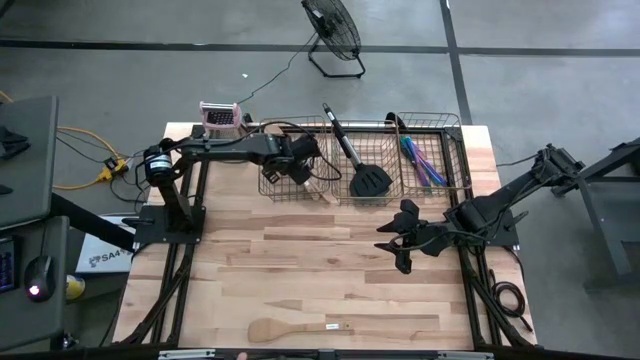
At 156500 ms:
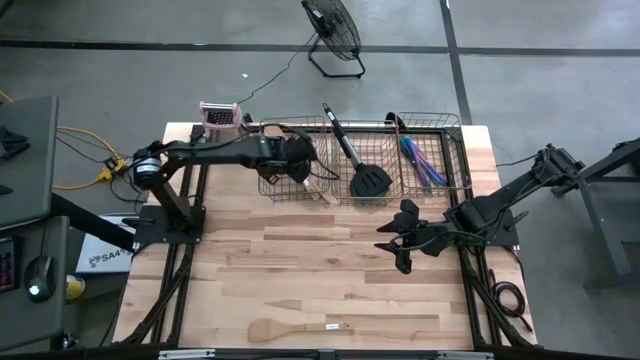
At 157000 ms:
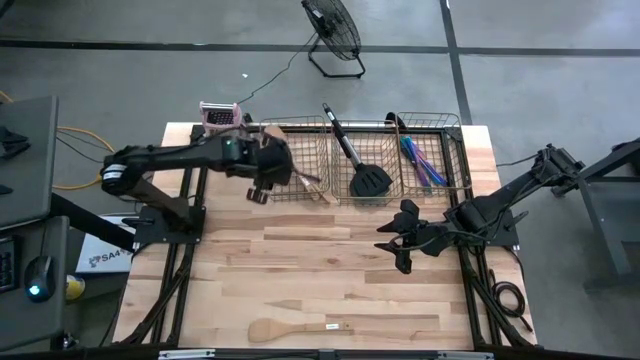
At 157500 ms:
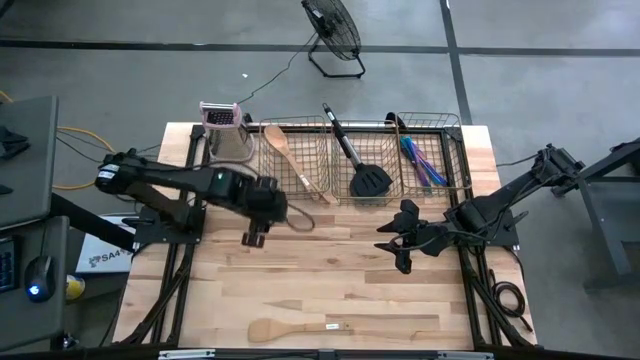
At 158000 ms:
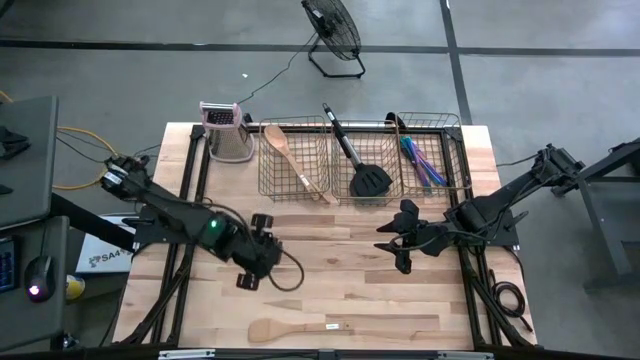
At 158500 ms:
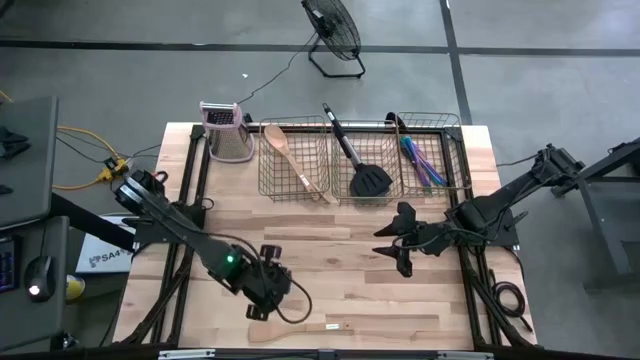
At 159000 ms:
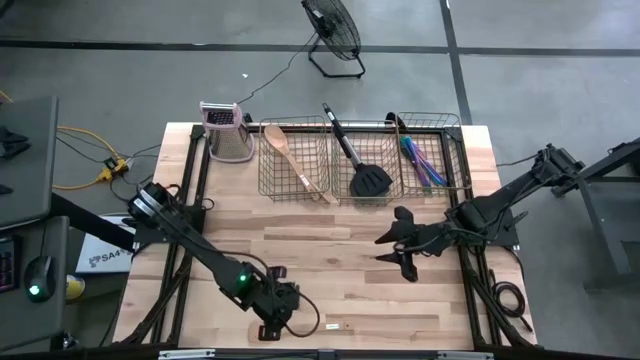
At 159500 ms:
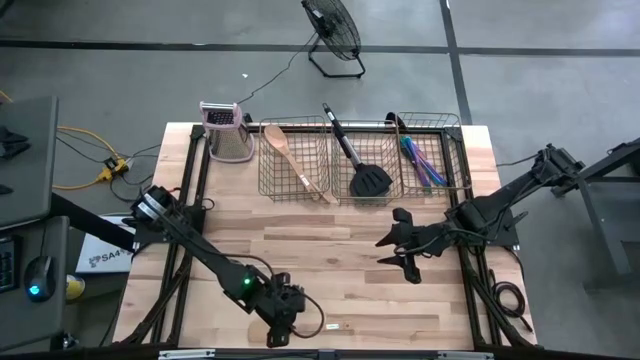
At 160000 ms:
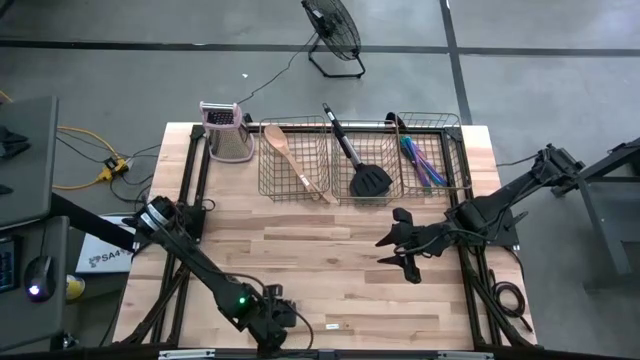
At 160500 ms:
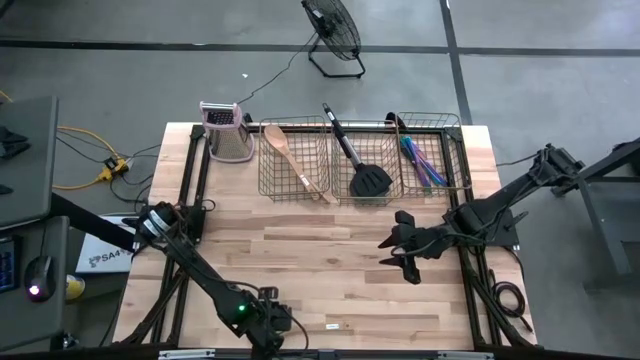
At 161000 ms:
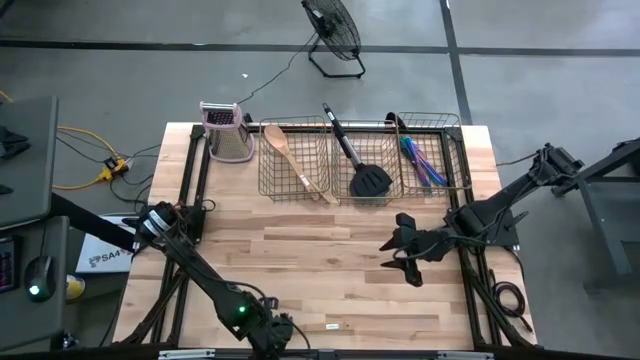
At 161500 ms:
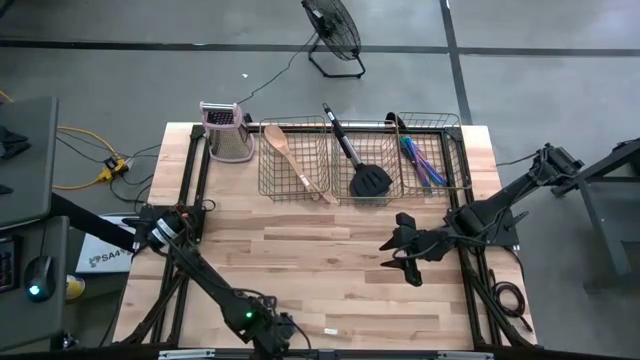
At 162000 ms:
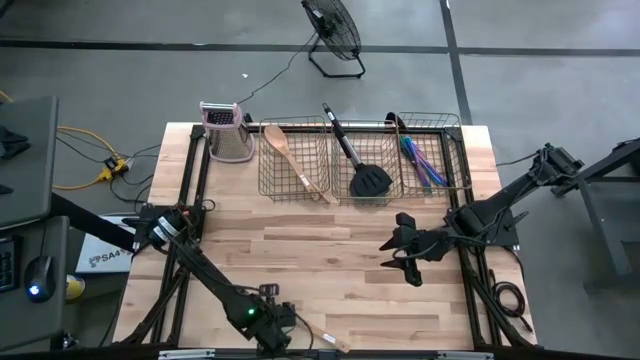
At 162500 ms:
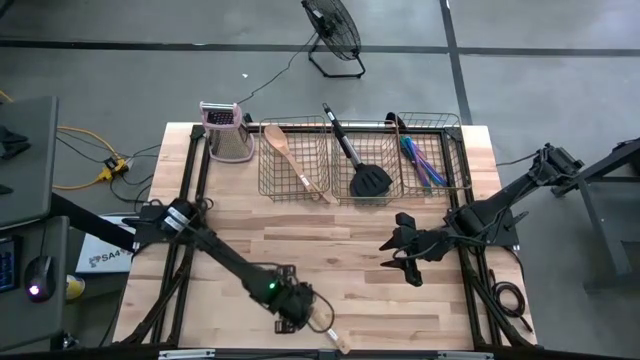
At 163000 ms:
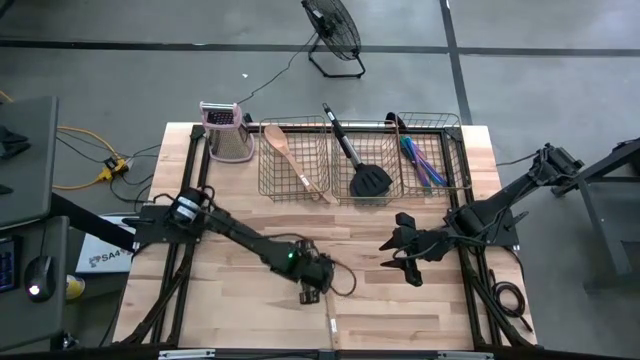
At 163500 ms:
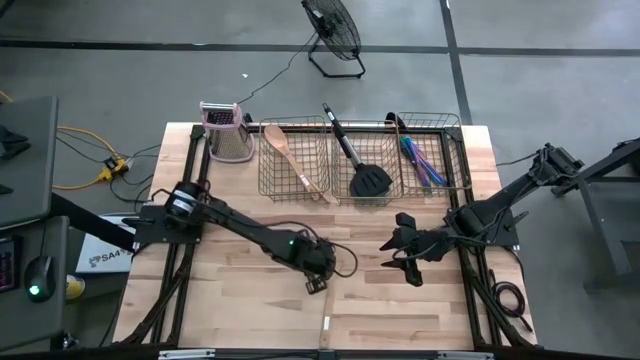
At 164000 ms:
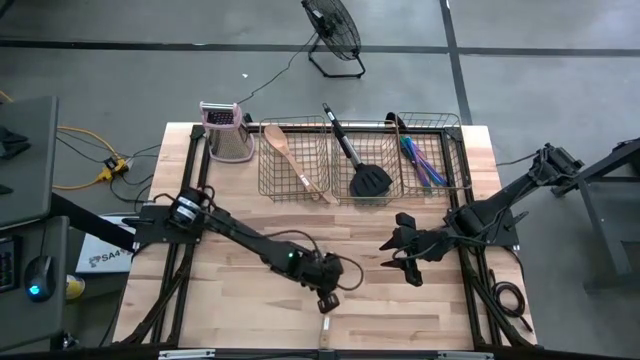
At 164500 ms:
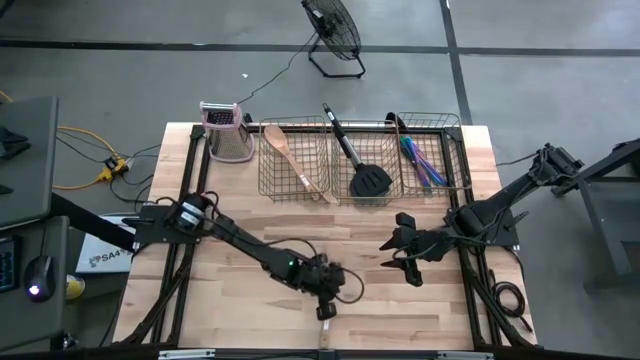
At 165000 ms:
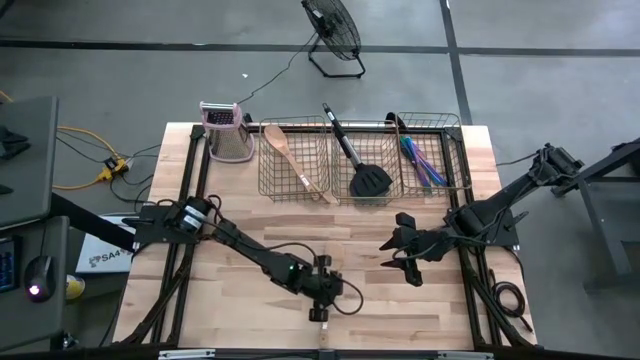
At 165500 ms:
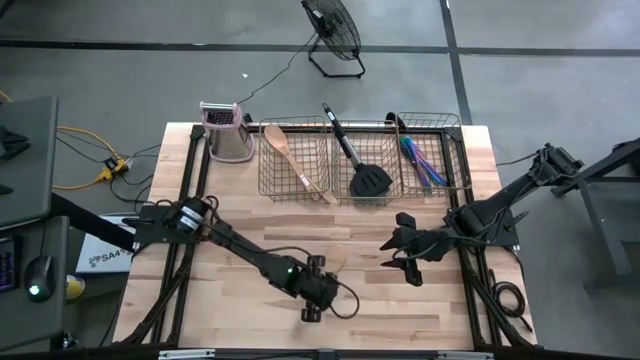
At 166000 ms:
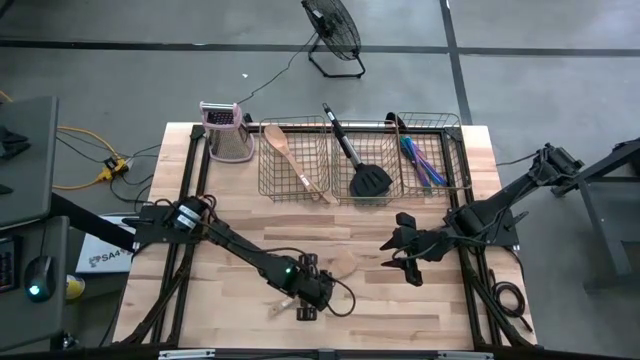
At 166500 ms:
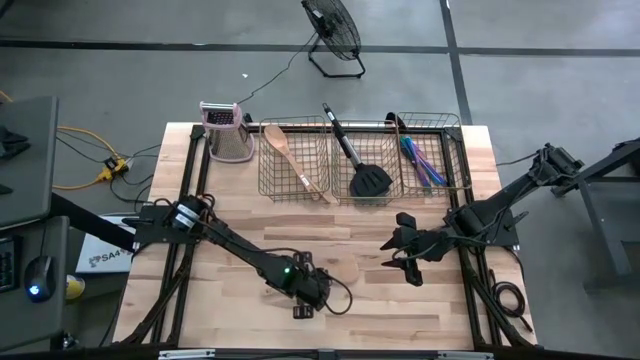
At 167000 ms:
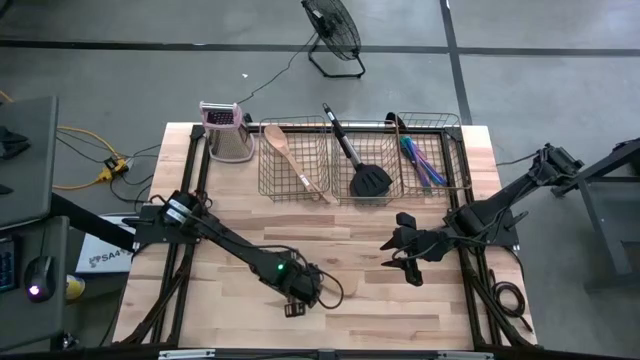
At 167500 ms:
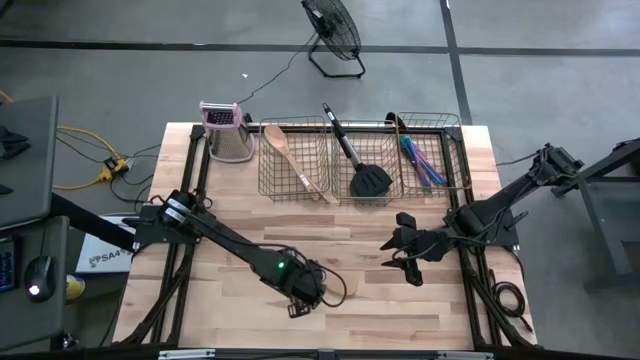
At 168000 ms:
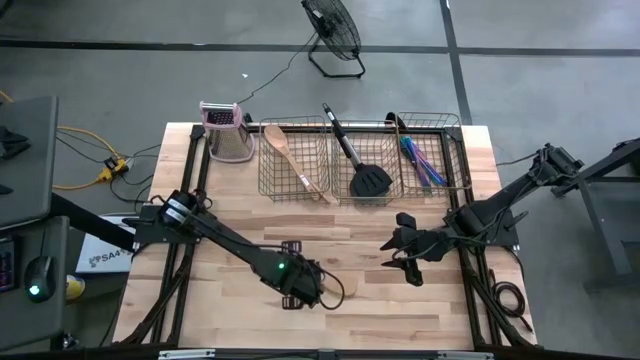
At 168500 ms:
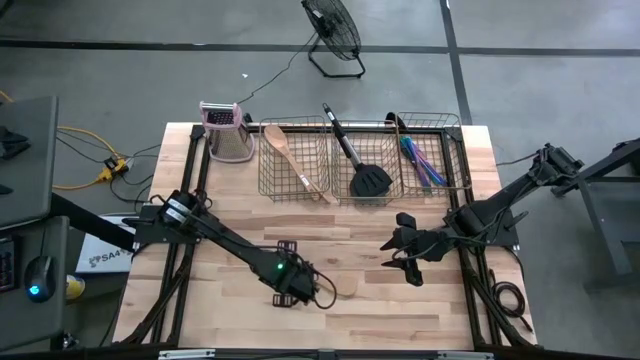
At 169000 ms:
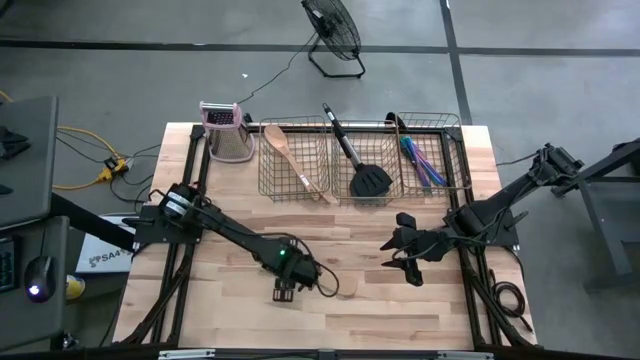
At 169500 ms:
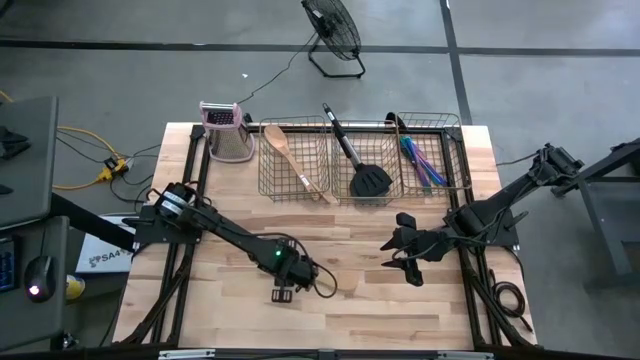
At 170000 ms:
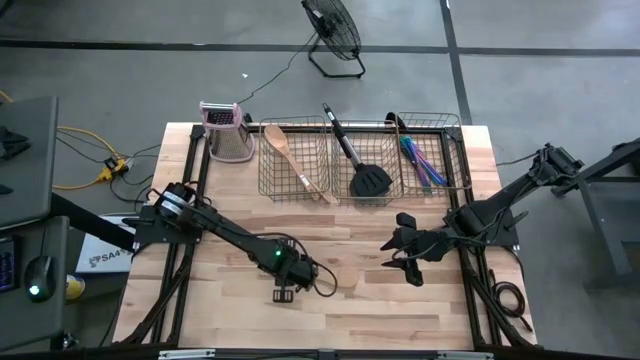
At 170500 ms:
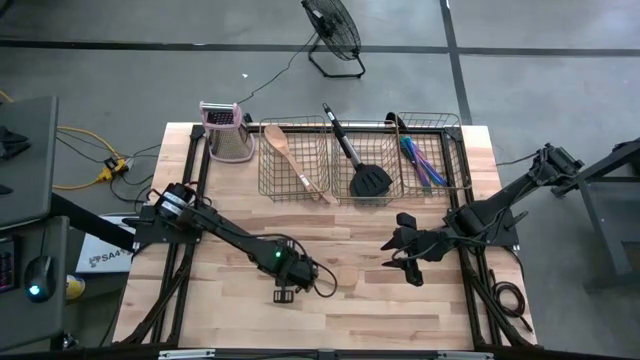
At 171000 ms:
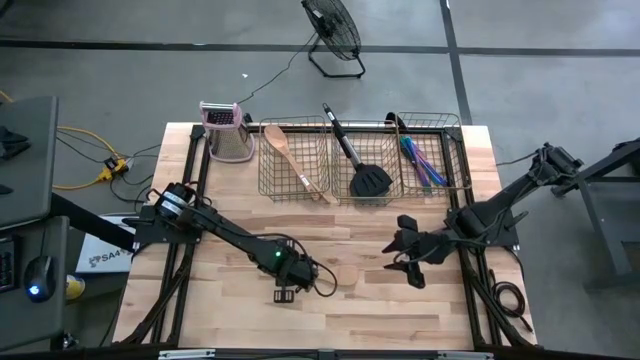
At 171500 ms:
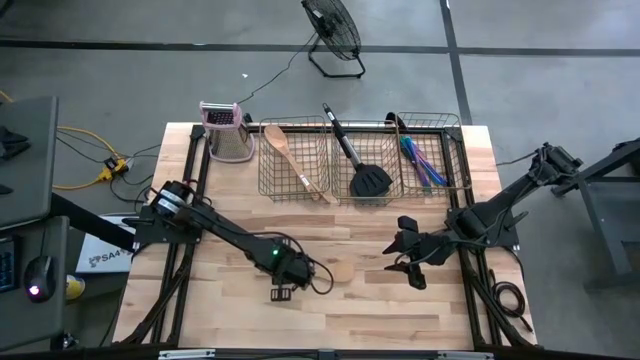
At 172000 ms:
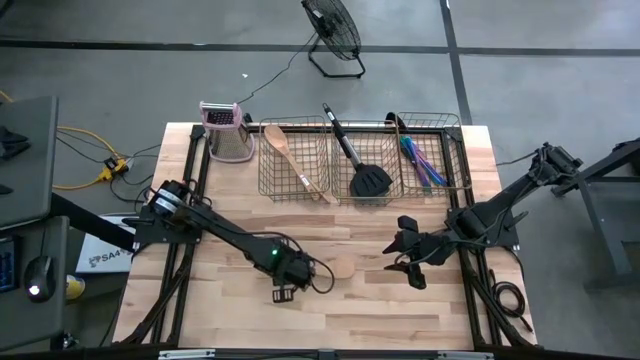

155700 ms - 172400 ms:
Task: Pick & Place Kitchen Items
Put the wooden turner spatula into the left mesh basket

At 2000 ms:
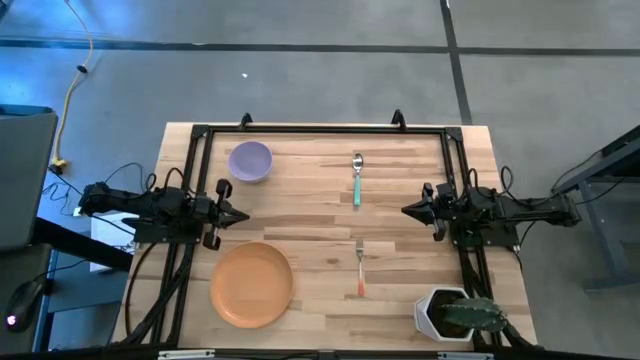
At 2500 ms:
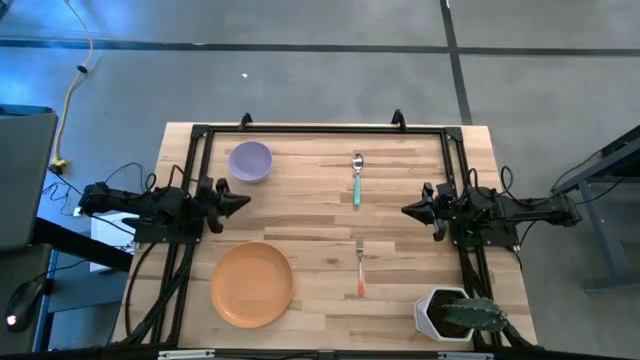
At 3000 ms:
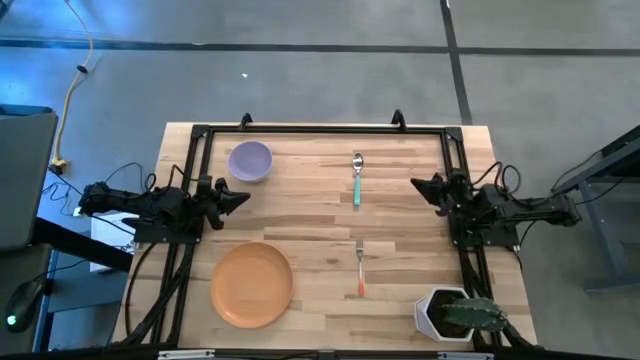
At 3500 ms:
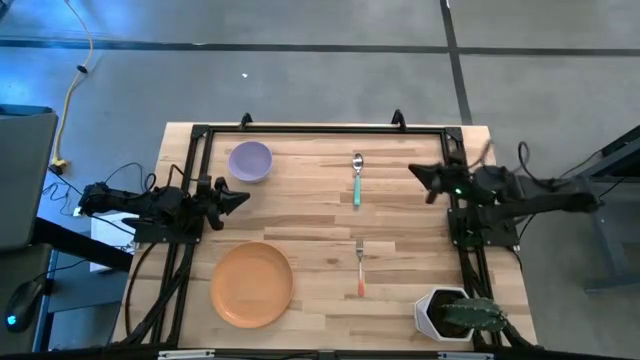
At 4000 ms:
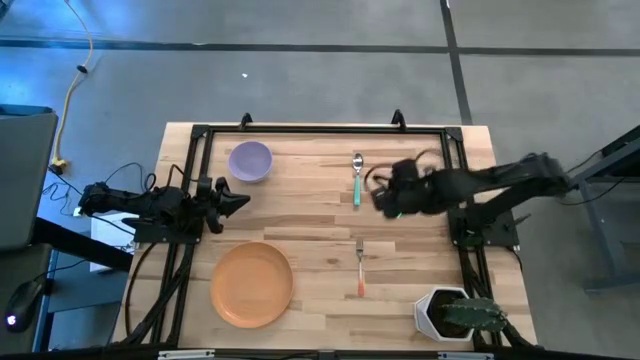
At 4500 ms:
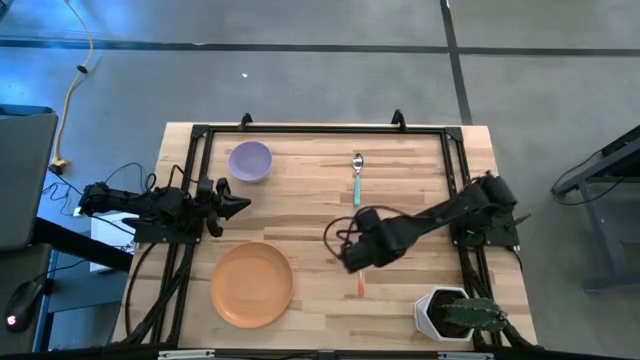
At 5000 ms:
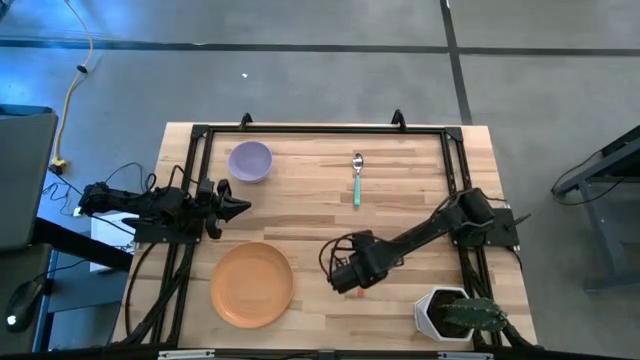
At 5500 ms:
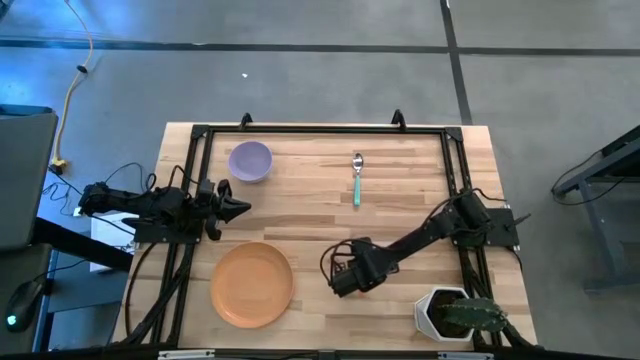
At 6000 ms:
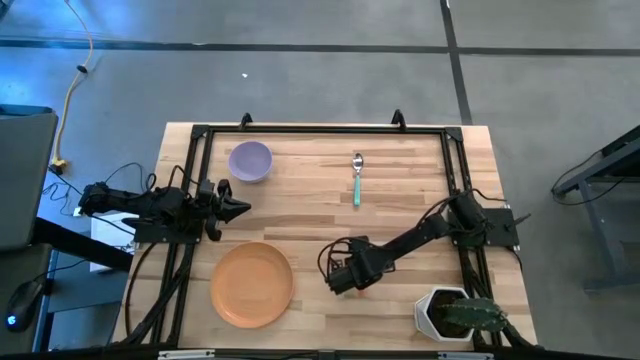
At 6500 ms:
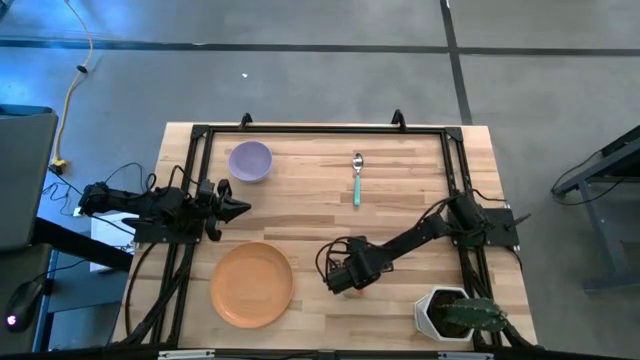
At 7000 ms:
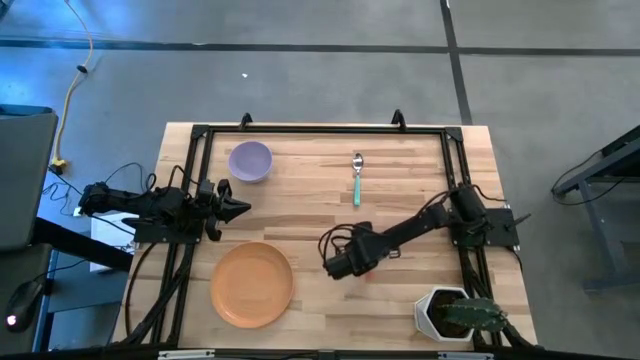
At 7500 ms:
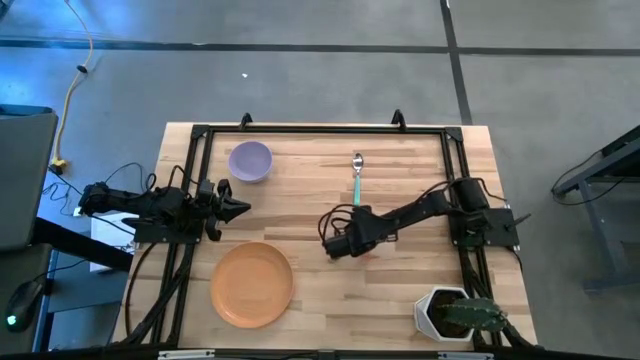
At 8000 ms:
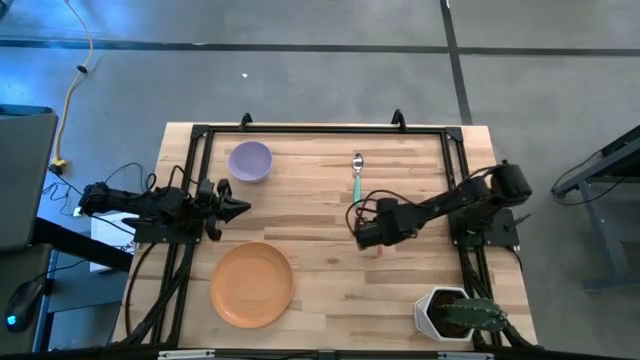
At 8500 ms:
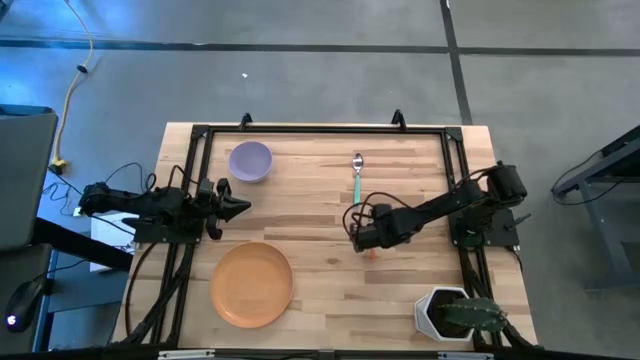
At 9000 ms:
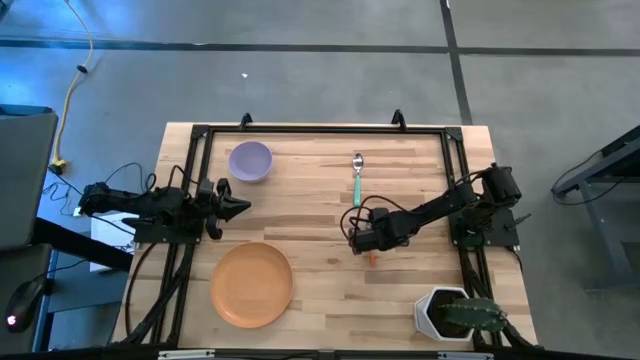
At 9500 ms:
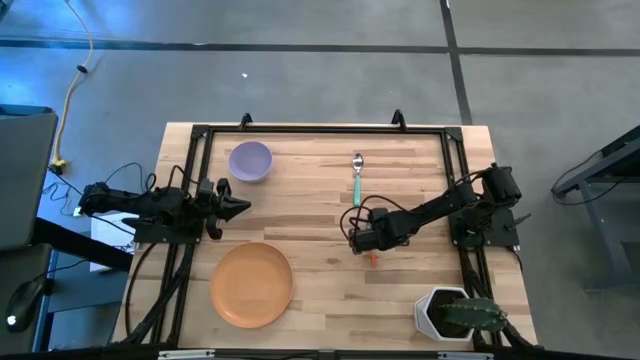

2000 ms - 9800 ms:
Task: Set table place
Adjust the orange fork
